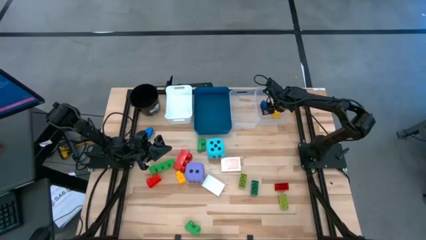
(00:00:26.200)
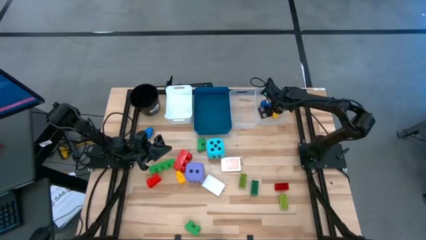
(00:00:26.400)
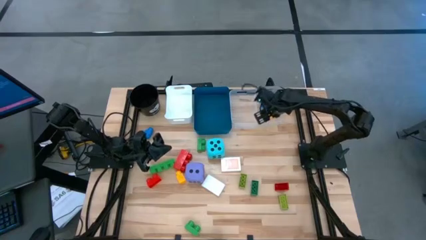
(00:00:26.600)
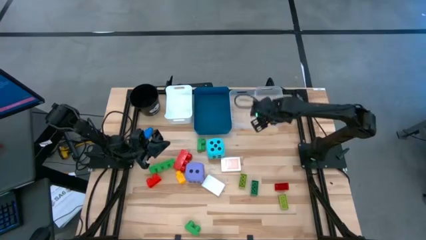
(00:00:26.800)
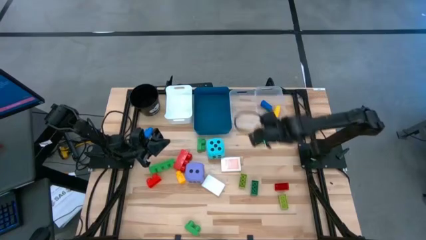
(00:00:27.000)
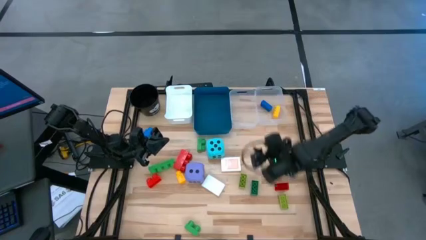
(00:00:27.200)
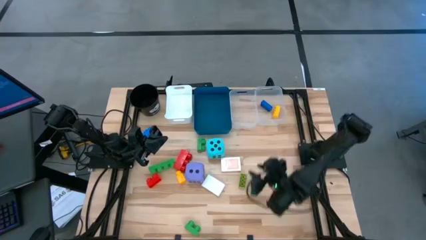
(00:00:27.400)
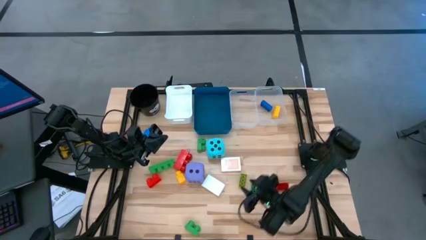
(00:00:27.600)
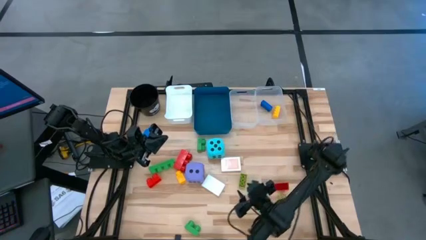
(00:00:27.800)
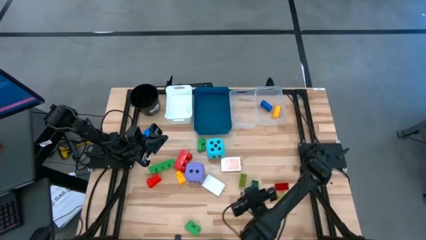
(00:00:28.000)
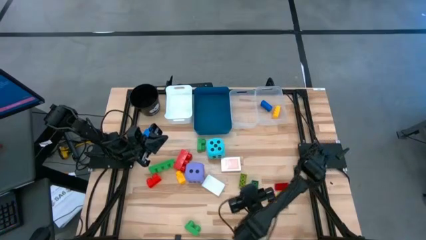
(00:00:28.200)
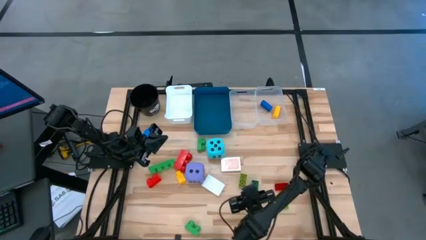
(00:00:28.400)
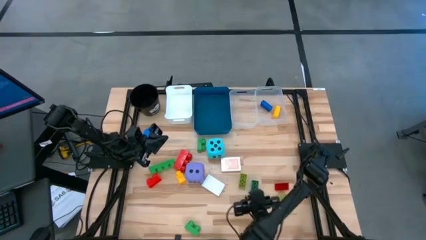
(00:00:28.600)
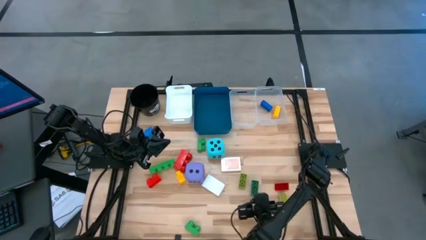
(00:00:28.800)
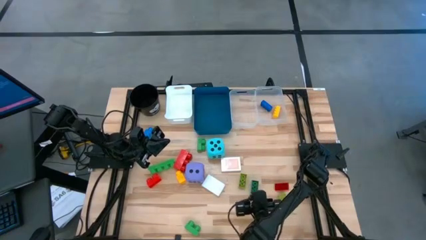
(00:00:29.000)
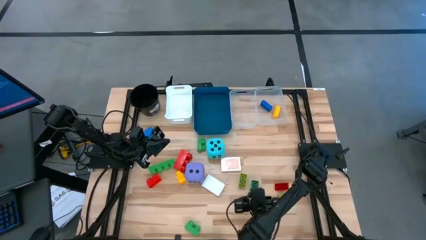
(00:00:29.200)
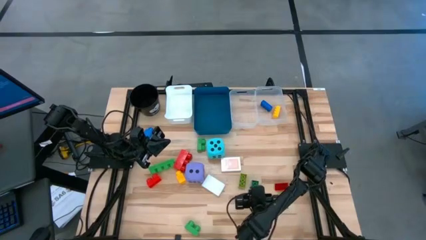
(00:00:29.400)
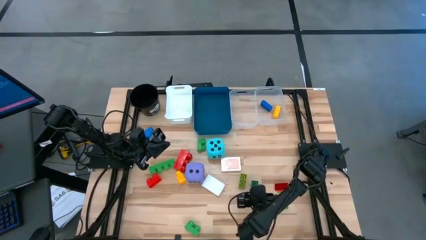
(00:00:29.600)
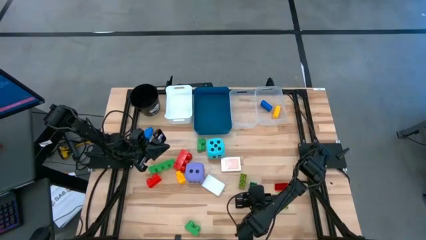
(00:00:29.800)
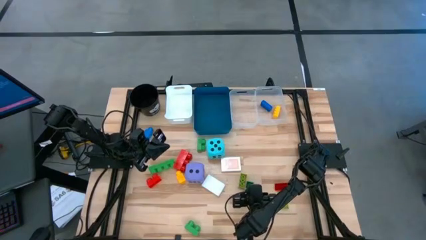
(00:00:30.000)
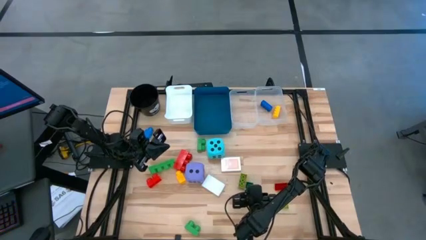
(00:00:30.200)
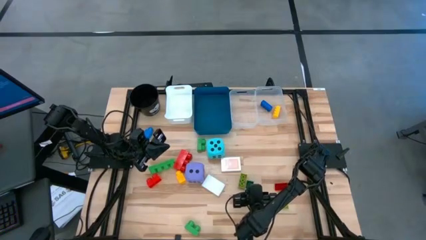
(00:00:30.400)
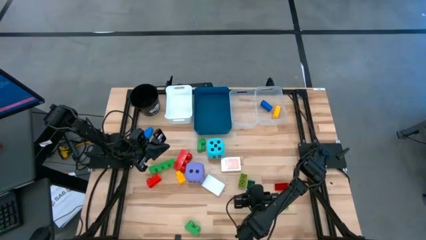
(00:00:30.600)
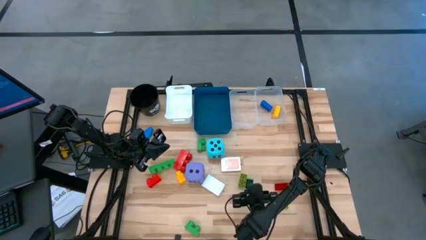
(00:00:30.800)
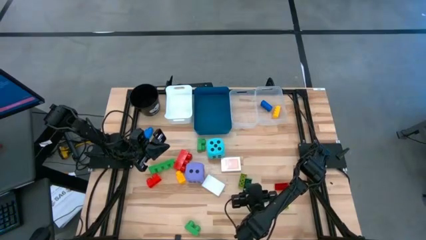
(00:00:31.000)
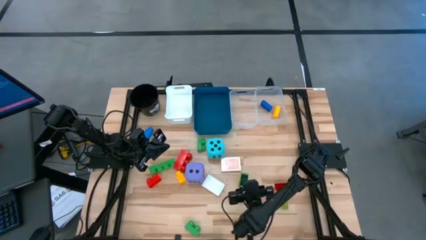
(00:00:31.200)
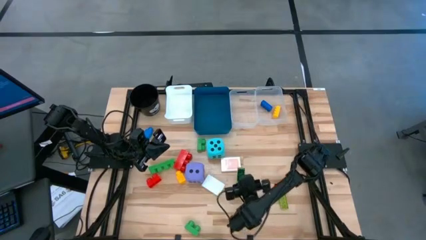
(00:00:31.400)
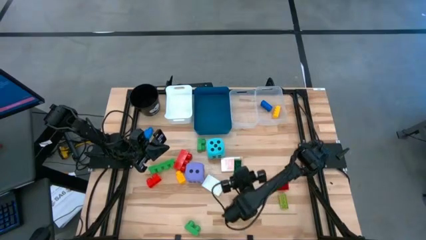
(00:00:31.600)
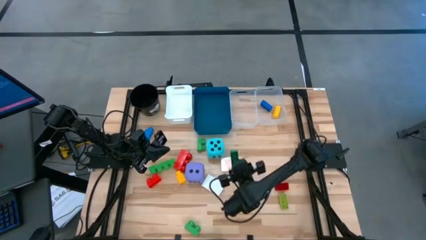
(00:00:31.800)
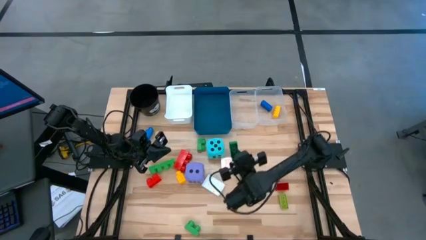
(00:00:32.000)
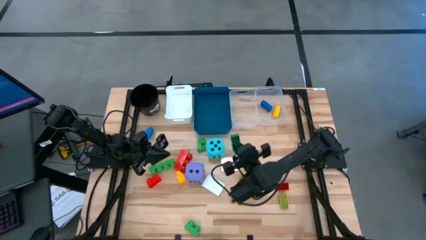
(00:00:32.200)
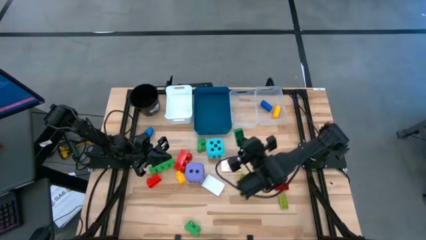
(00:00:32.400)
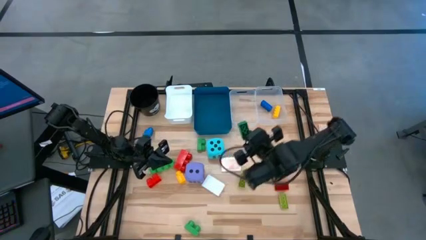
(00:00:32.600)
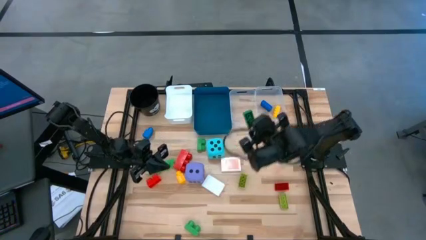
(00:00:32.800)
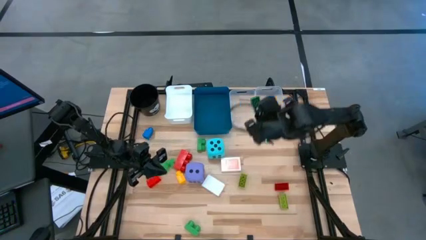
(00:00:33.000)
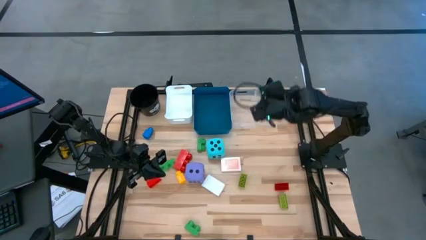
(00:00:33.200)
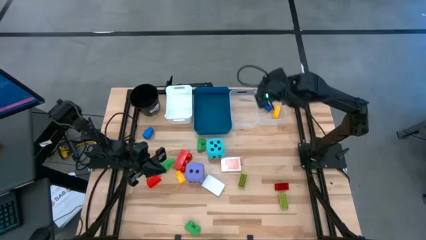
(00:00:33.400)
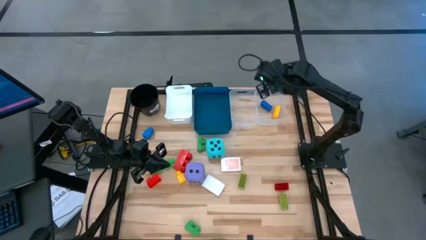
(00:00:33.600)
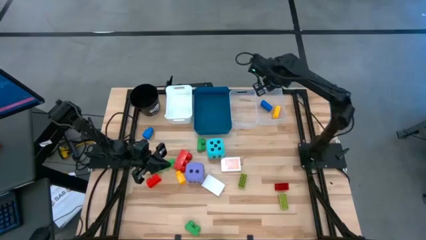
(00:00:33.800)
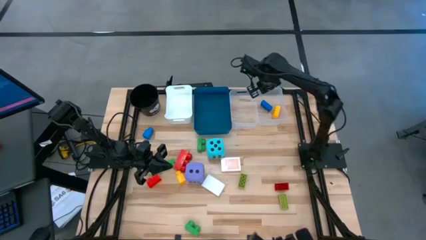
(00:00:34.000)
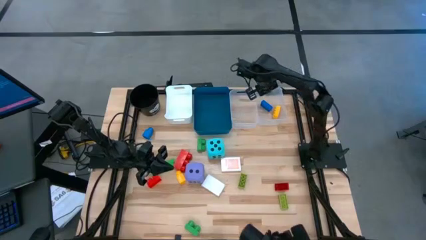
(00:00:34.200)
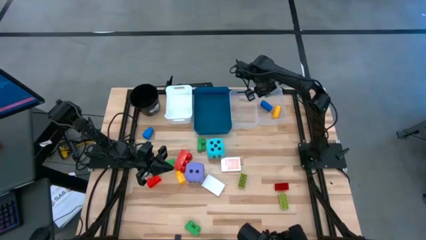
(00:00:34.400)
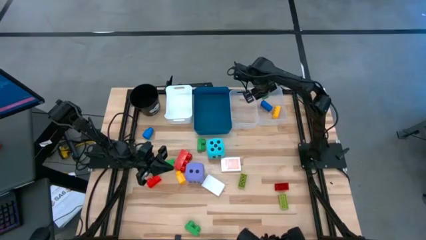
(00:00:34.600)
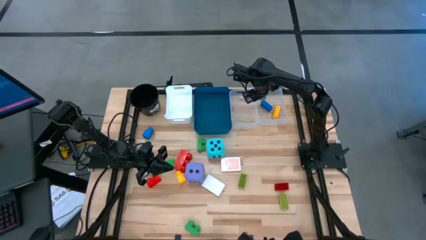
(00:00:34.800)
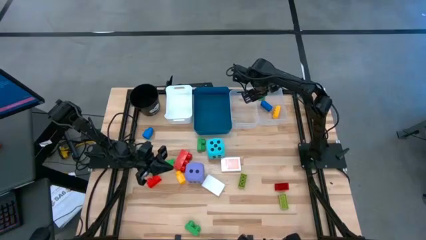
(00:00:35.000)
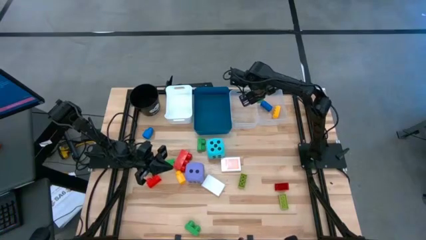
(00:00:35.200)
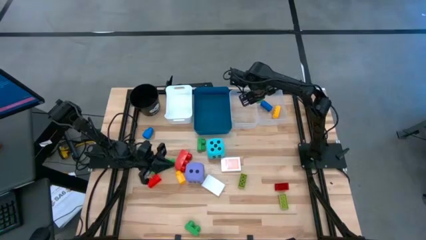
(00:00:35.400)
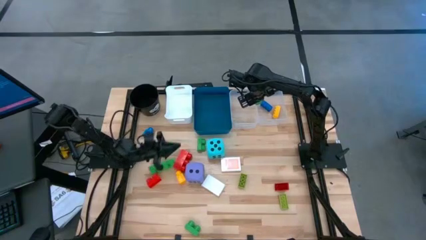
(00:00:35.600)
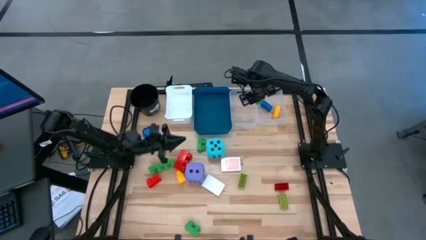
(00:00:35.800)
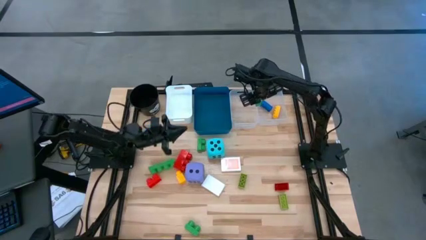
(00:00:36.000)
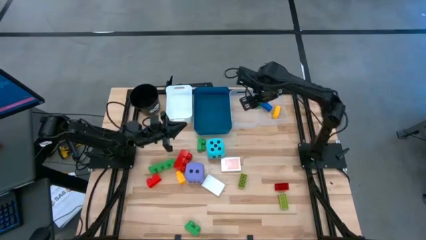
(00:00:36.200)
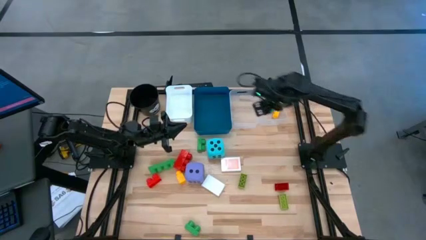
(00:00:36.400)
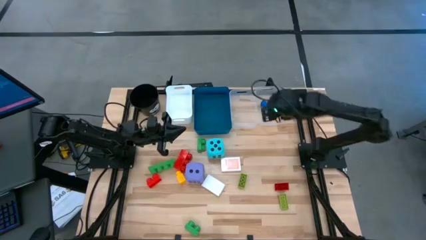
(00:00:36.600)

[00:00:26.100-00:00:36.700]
Task: Pick & Place Toys
Put the small green game piece into the right transparent bin

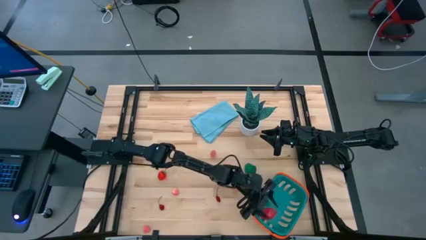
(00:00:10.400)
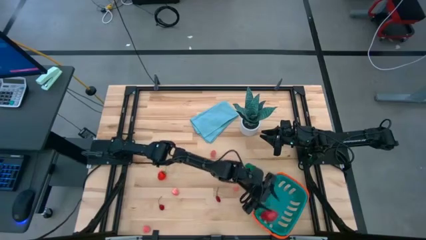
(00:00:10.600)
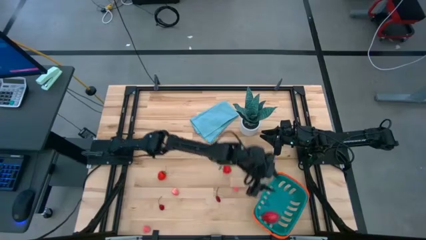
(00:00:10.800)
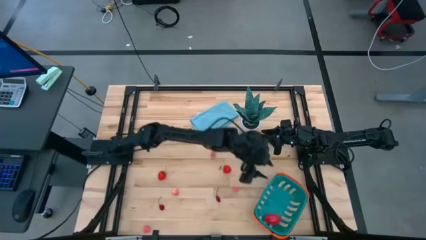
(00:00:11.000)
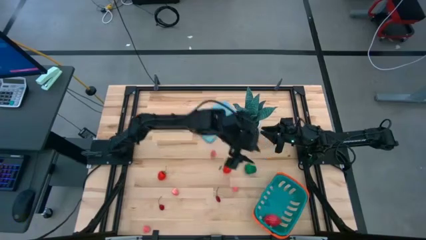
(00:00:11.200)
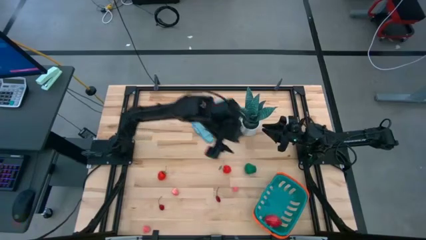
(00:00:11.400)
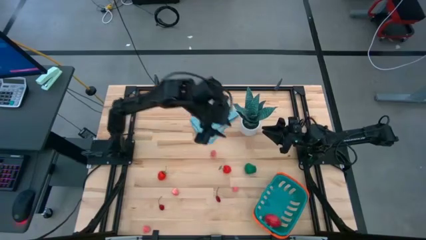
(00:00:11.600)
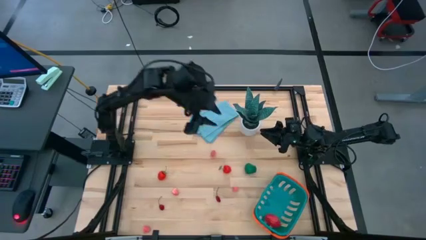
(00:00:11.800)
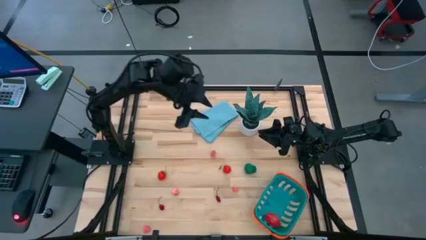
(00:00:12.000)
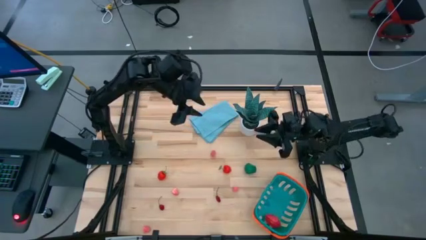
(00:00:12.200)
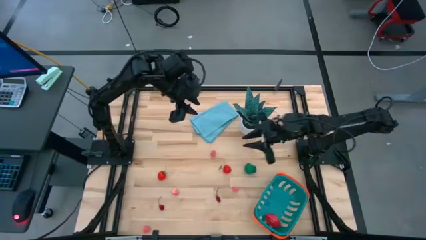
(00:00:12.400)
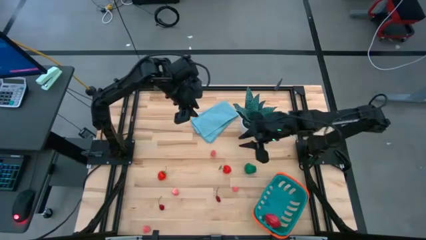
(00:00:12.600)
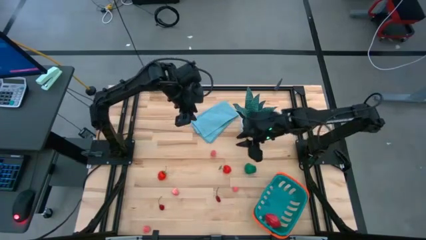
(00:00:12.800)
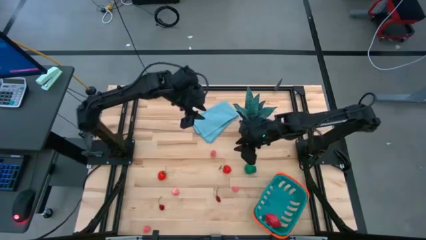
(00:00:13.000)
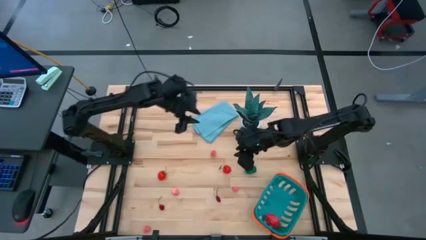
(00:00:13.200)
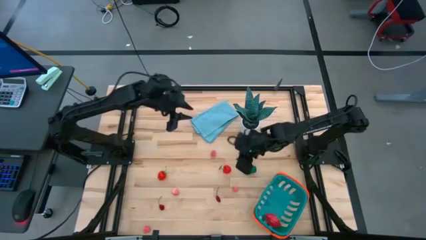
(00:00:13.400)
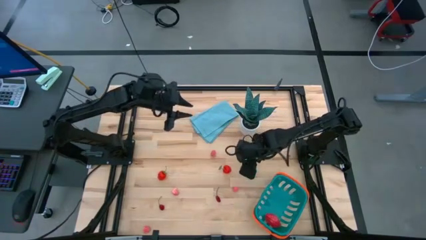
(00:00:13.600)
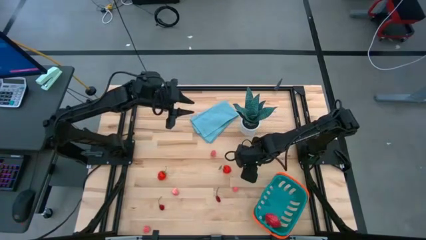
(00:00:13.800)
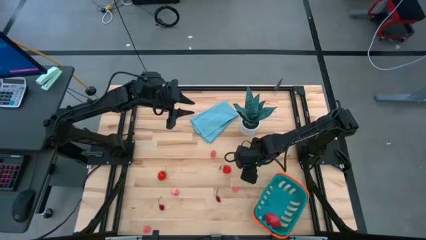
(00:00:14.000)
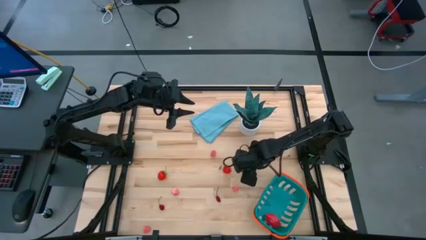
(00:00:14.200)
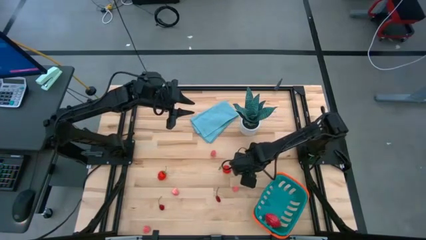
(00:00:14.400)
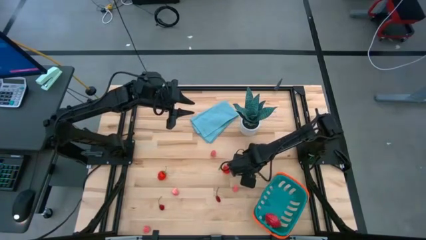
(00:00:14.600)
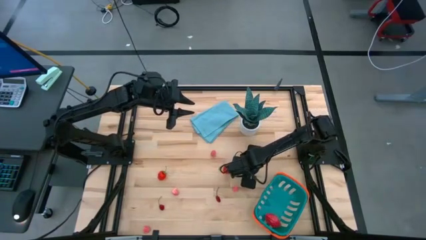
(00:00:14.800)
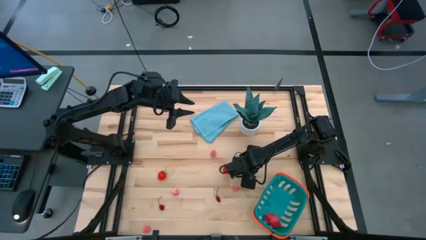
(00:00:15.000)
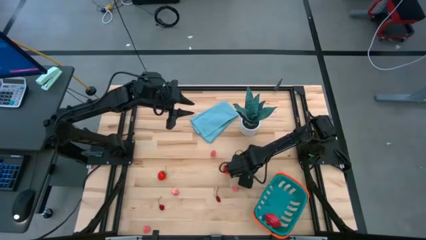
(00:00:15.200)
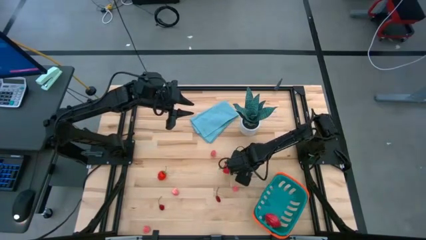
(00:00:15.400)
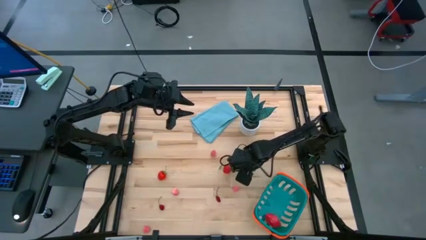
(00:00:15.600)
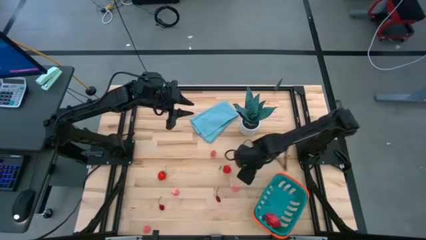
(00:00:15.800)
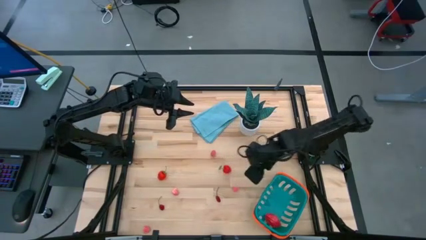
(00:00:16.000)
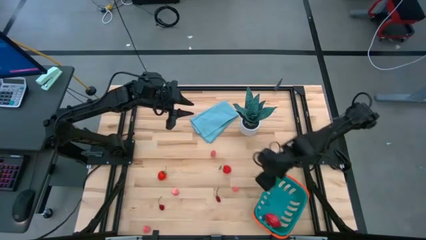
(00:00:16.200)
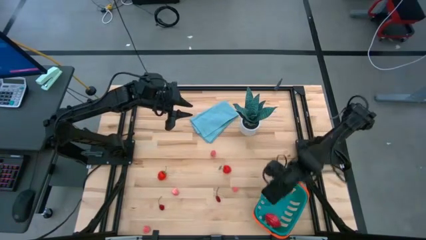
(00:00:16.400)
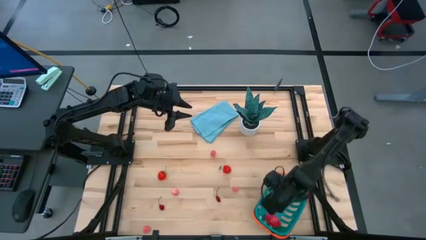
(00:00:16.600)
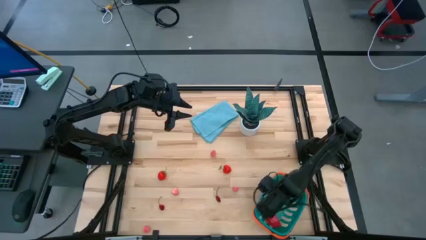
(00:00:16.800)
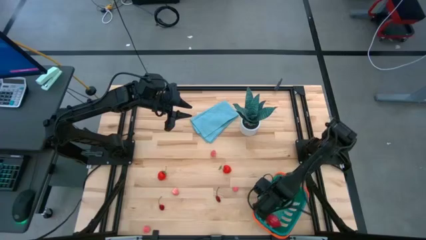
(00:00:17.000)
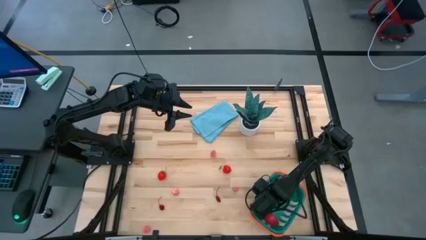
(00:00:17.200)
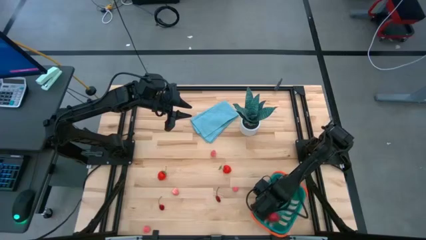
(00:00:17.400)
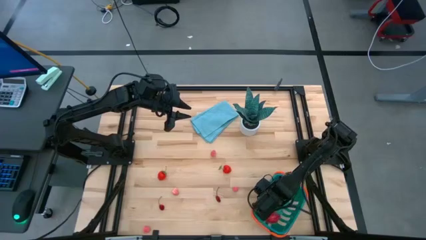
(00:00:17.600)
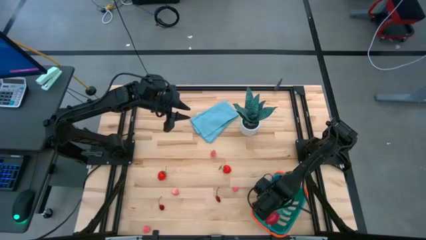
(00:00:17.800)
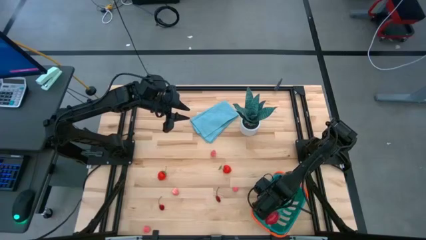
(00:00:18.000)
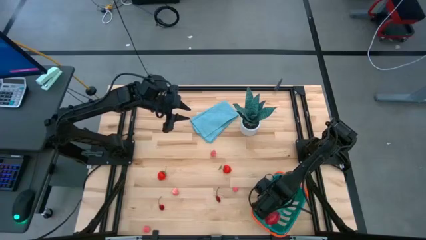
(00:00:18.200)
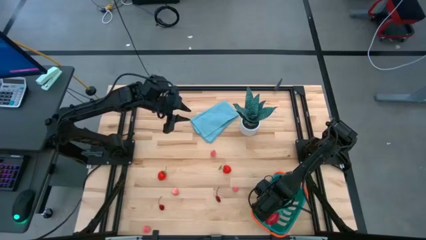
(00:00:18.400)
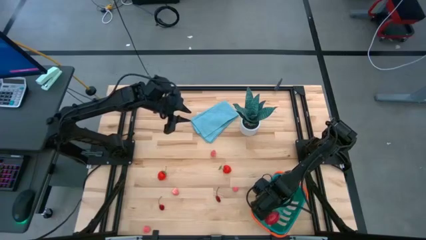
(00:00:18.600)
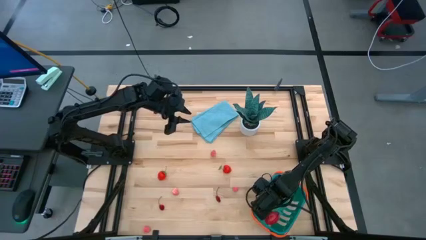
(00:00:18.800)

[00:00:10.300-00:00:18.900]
Task: Pick and placing Produce into tupperware
Put the bell pepper into the basket
